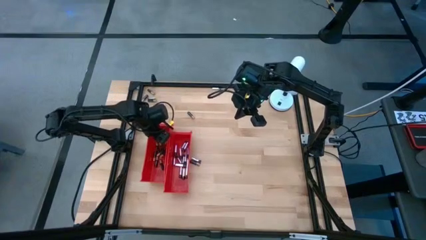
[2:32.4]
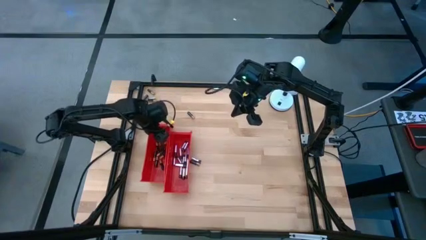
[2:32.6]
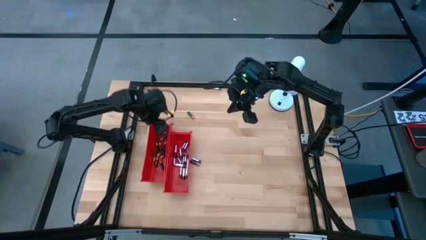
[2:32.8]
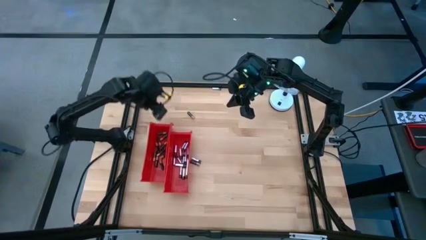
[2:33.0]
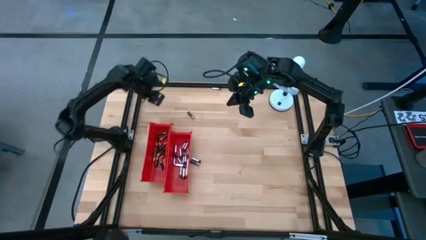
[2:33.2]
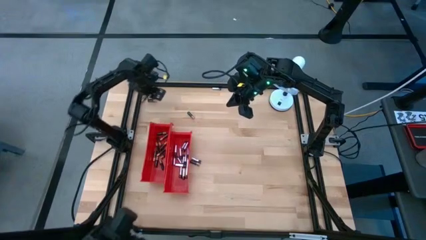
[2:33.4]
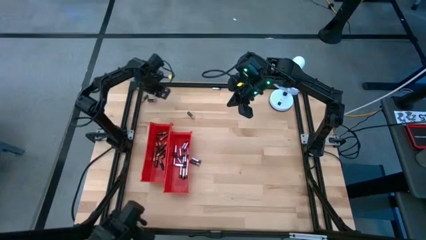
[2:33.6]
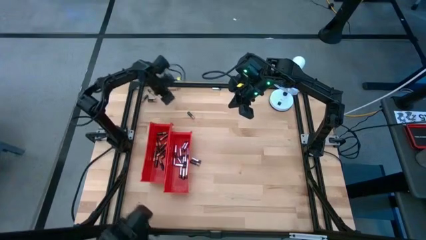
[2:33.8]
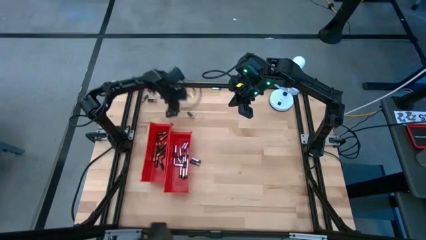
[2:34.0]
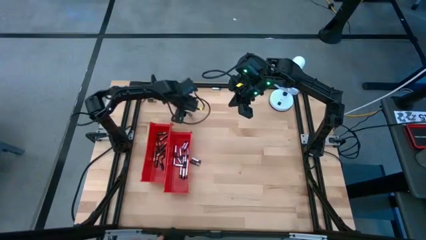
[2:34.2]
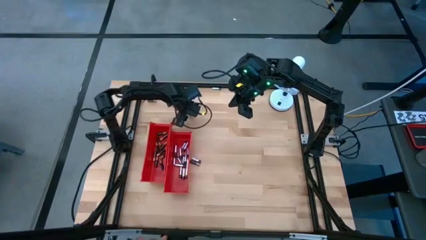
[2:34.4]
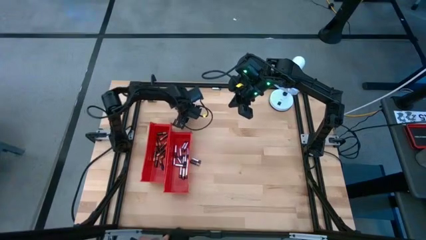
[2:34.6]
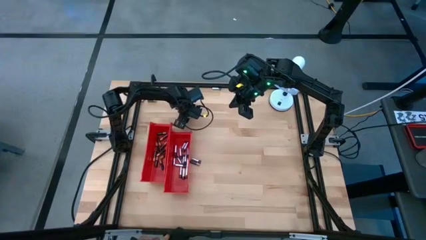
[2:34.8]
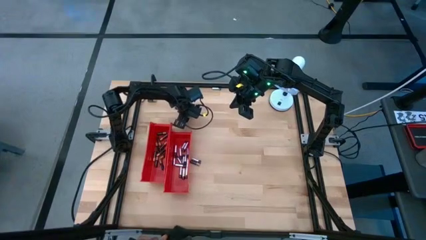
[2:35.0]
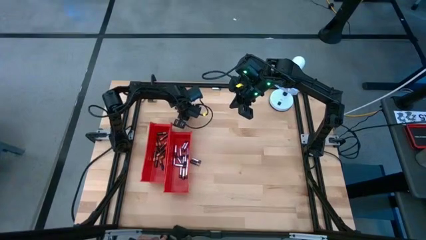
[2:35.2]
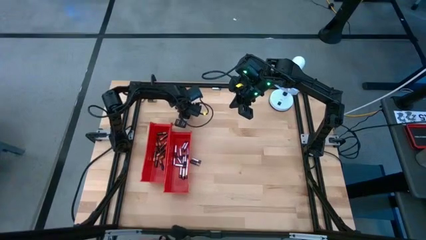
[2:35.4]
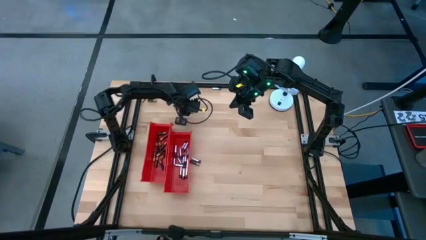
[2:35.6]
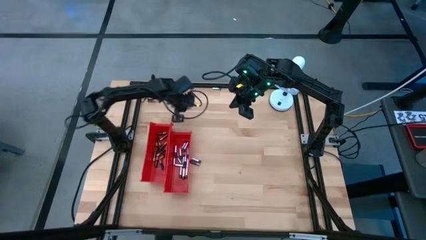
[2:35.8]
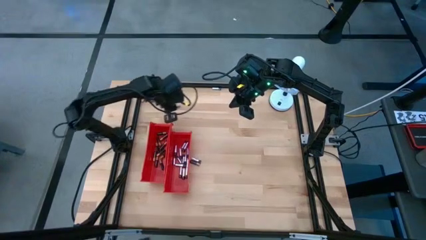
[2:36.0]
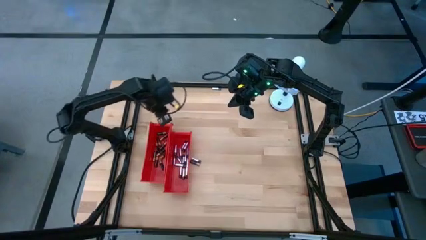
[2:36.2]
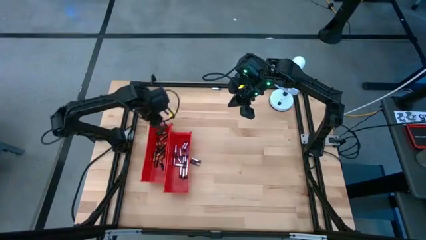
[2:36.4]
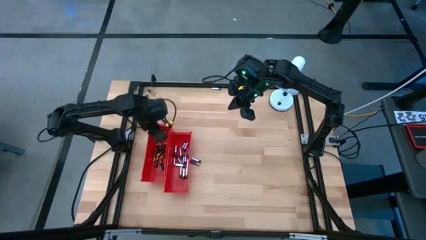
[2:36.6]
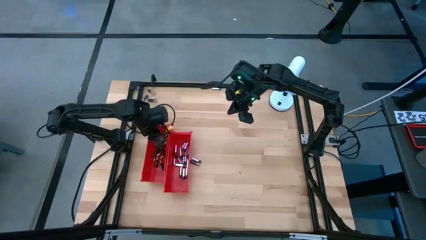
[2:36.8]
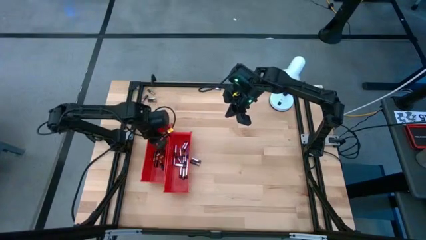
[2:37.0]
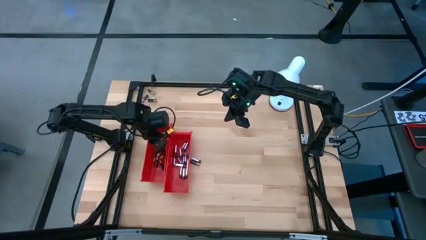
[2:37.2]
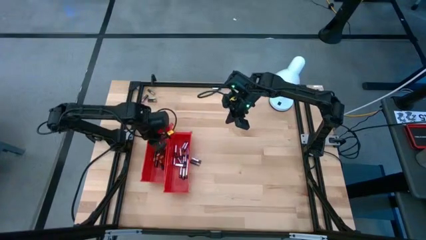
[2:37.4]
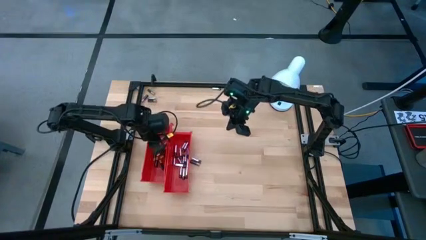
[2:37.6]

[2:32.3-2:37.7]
Task: Sort batteries
Put the black battery into the left red bin

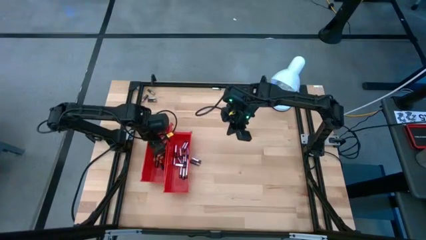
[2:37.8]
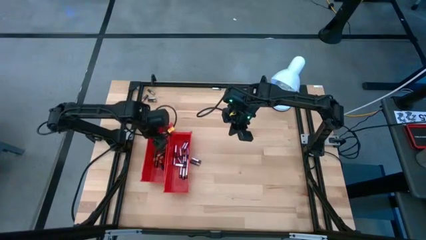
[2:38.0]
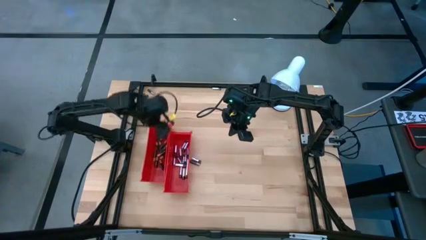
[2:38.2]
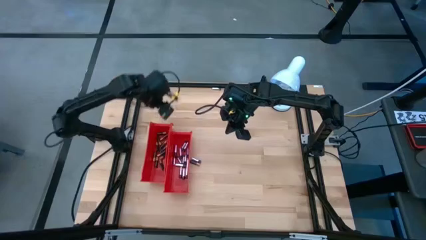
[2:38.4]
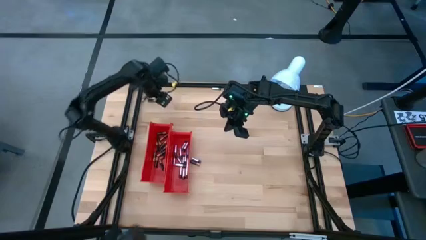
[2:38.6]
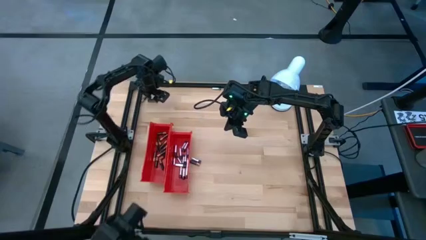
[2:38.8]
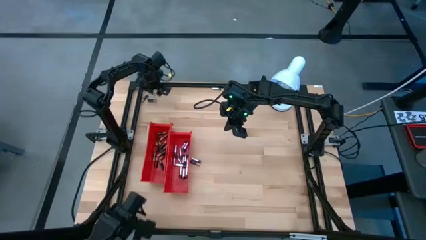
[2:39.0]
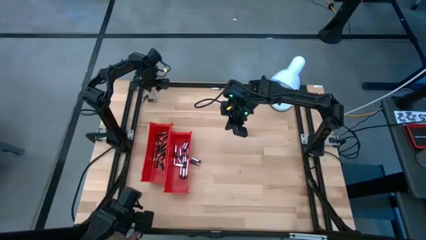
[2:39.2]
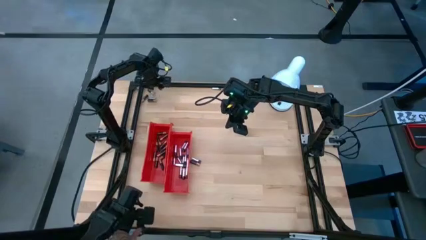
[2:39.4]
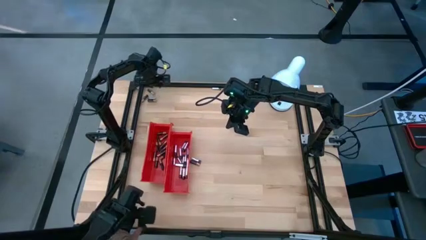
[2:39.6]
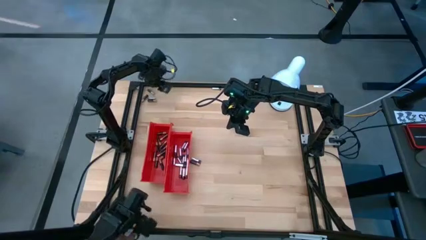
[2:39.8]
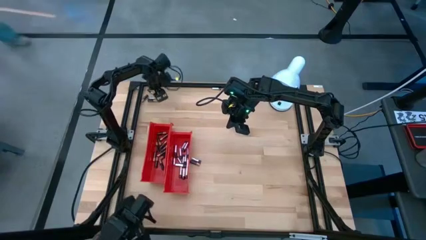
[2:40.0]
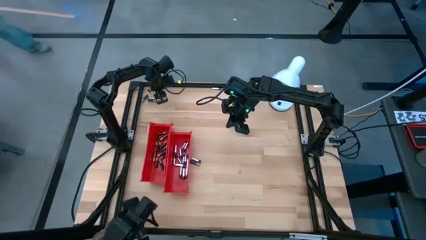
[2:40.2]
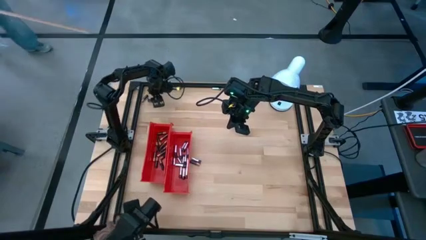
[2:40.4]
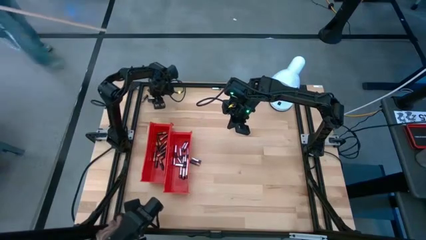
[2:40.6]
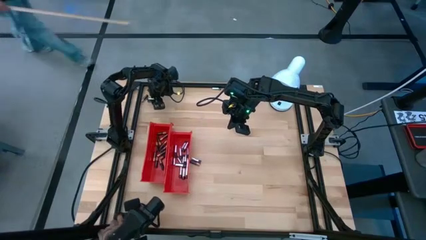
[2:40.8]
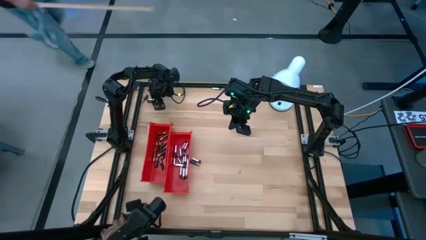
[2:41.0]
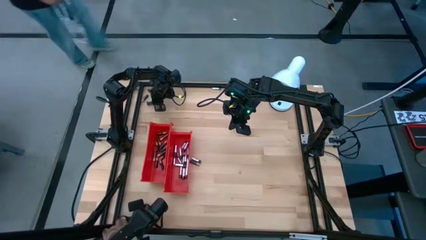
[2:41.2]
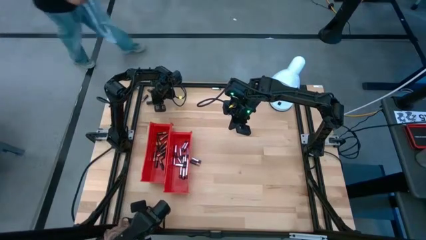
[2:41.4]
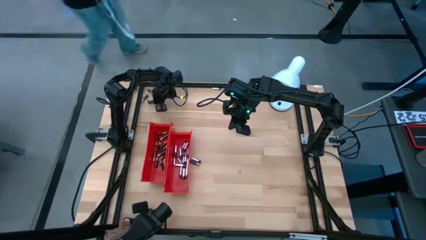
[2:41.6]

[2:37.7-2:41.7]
Put the black battery into the left red bin

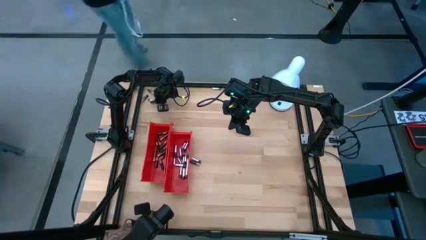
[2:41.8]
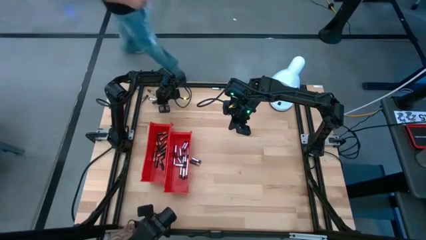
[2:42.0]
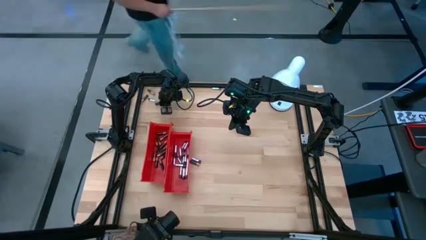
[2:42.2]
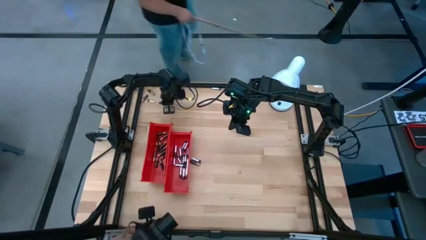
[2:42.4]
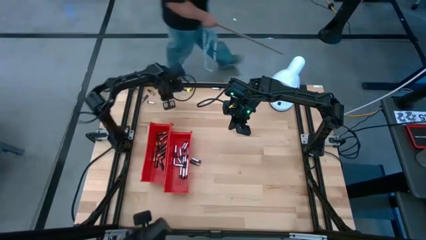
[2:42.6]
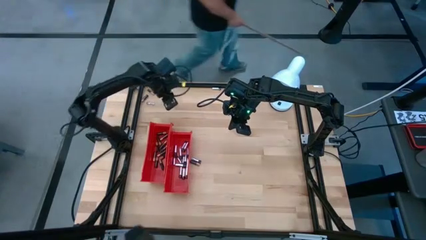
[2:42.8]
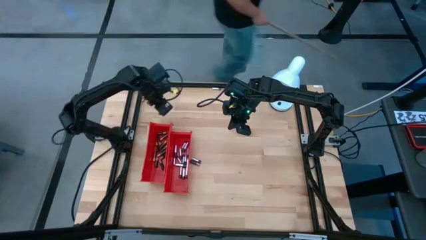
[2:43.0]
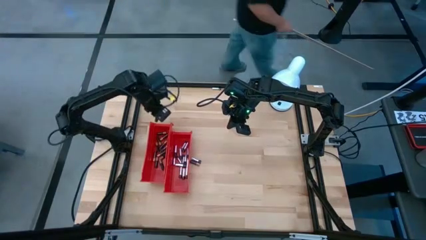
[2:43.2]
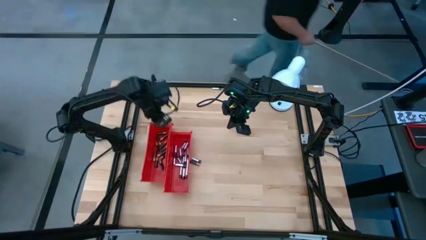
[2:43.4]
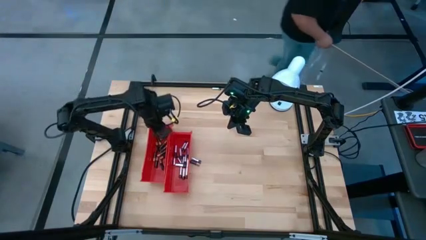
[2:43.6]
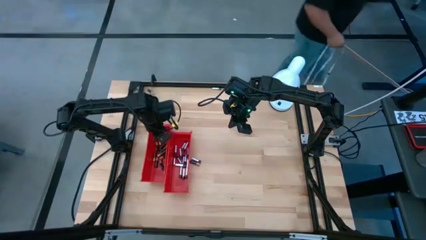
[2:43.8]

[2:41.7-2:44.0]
Put the black battery into the left red bin

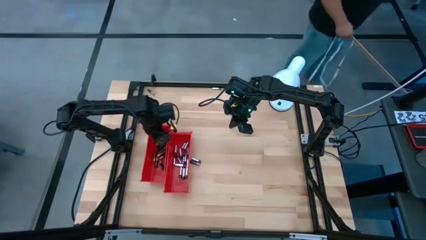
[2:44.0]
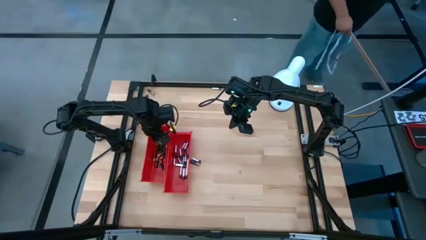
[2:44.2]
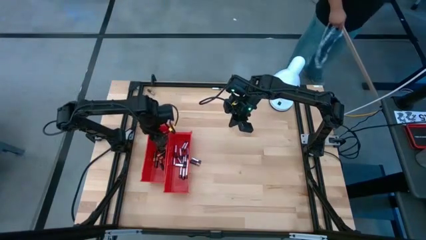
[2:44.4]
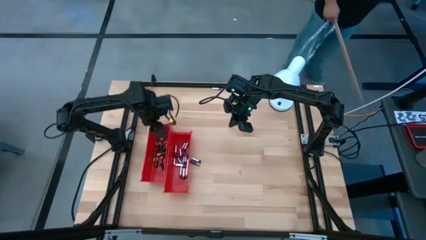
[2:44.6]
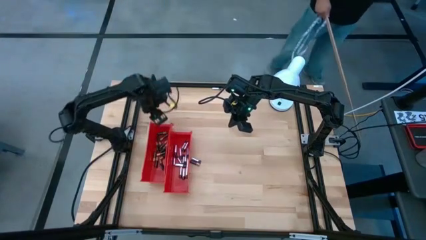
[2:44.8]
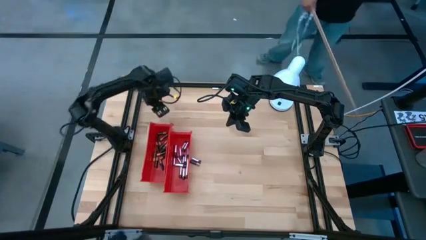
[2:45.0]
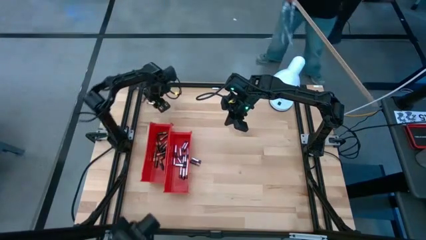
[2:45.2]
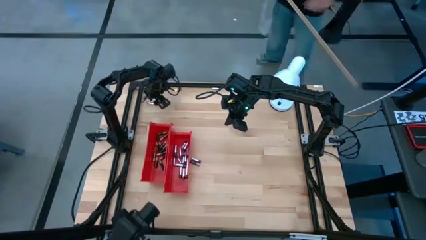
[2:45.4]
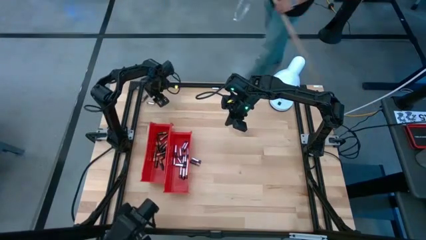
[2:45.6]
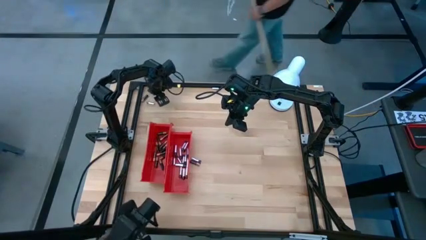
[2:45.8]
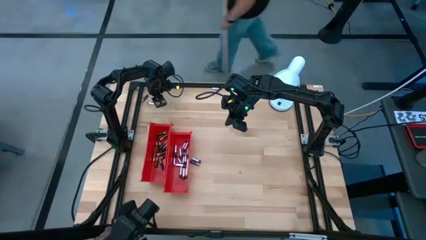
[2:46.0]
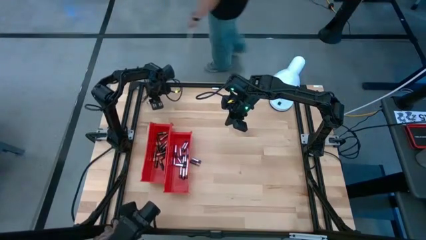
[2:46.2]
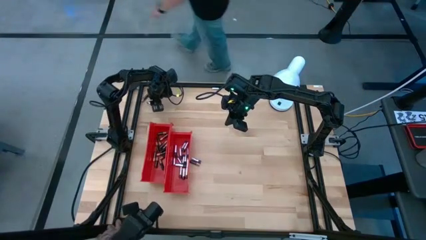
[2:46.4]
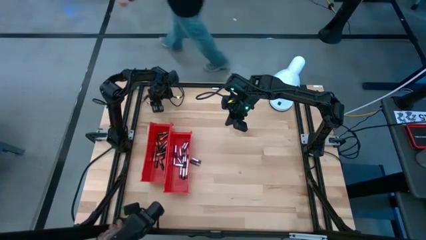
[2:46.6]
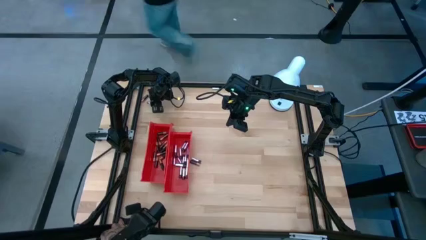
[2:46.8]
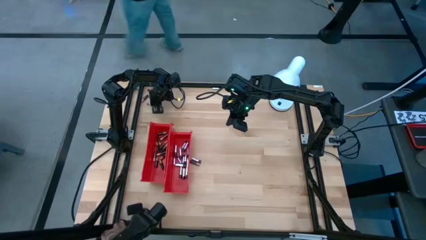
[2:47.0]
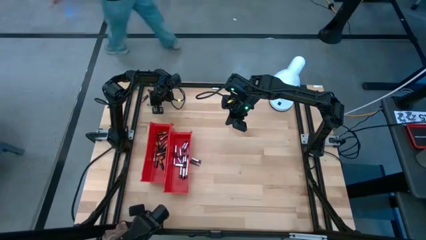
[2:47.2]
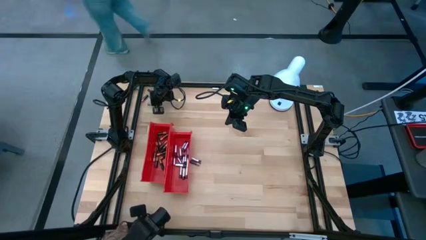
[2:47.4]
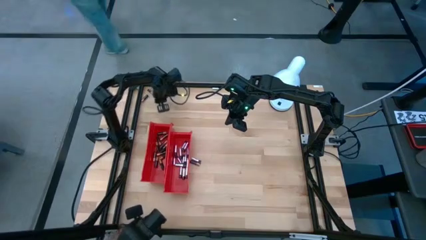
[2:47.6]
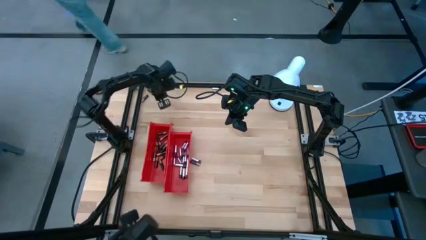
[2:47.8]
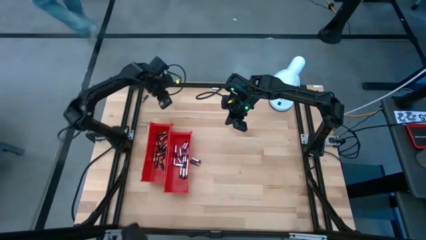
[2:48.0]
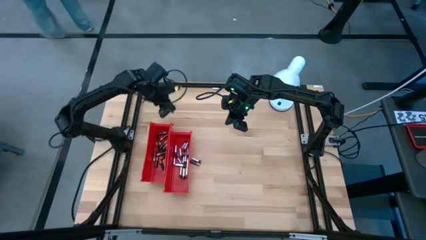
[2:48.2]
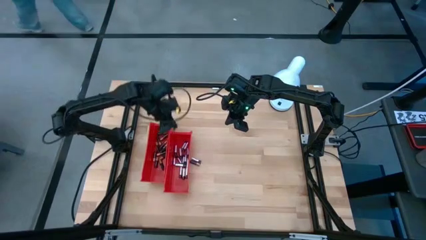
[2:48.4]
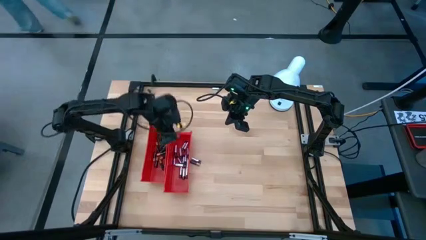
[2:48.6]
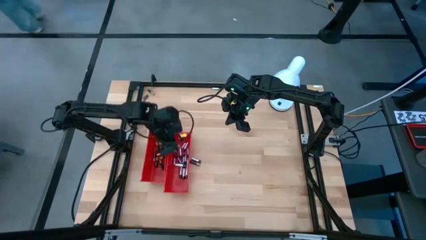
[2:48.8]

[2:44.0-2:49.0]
Put the silver battery into the right red bin
